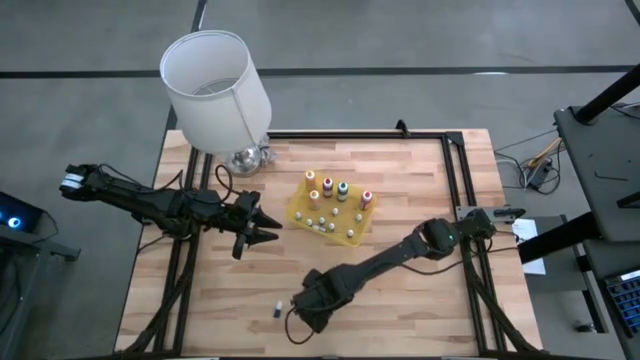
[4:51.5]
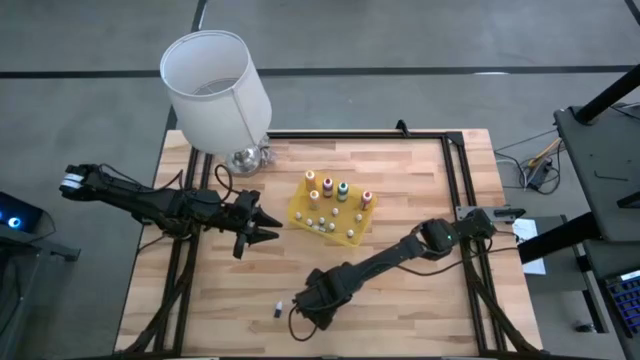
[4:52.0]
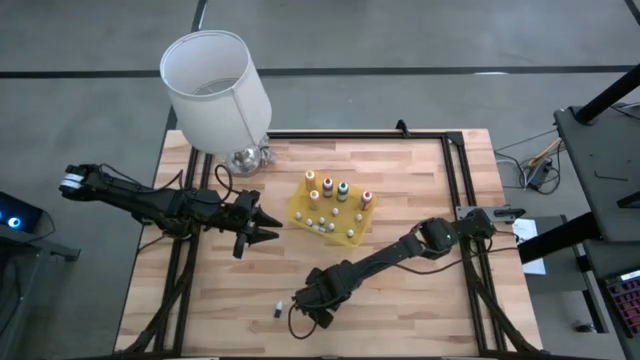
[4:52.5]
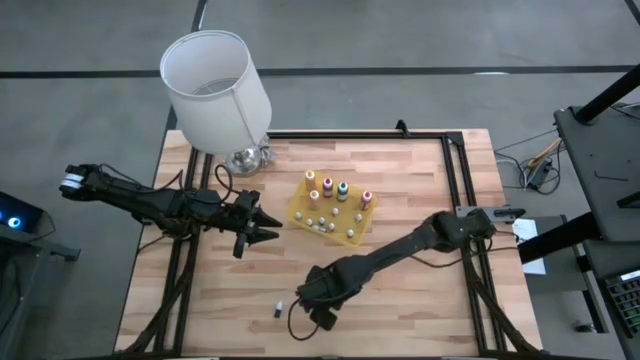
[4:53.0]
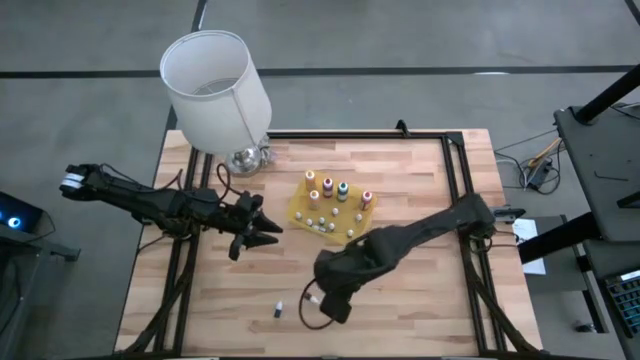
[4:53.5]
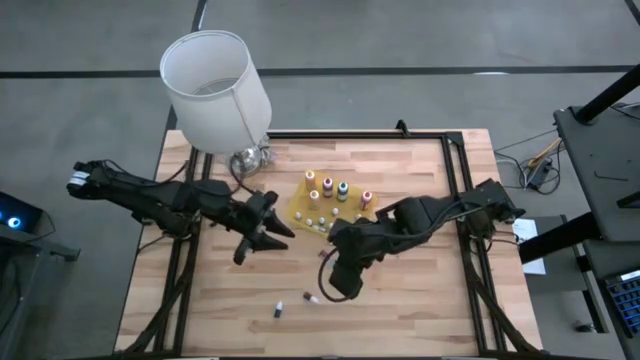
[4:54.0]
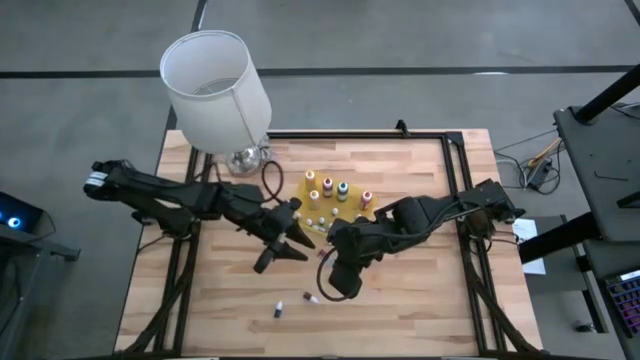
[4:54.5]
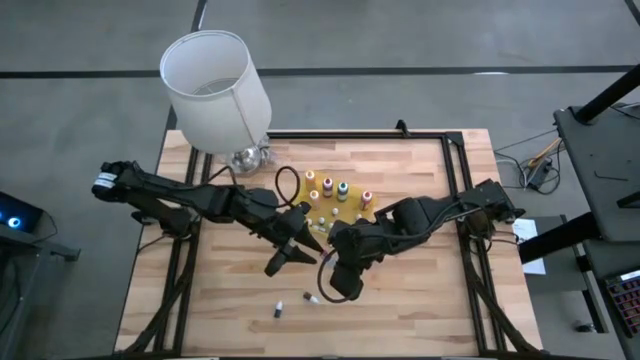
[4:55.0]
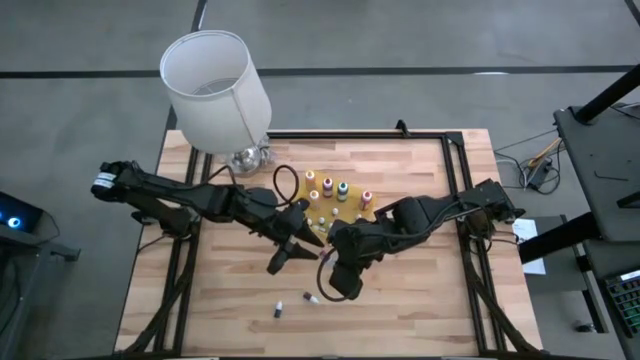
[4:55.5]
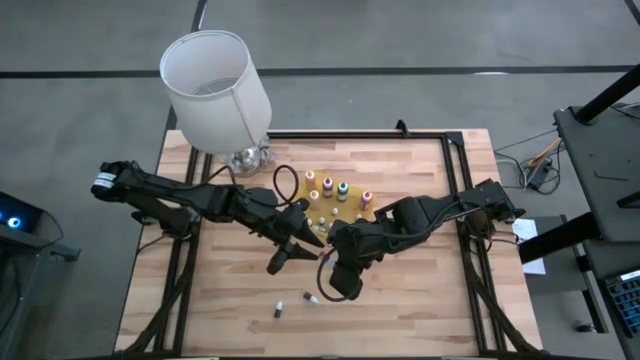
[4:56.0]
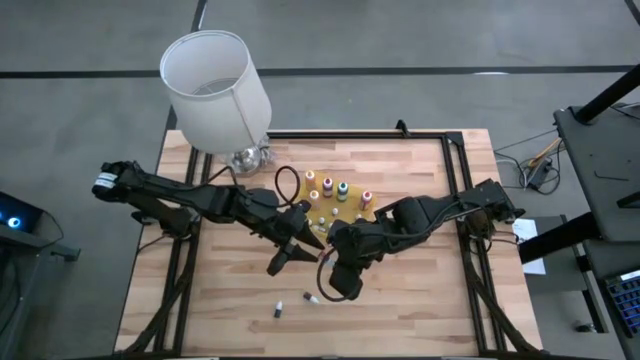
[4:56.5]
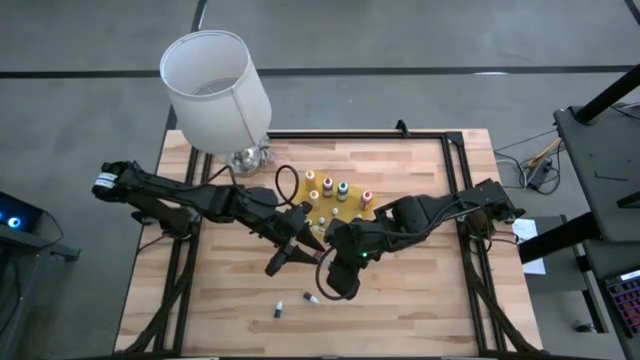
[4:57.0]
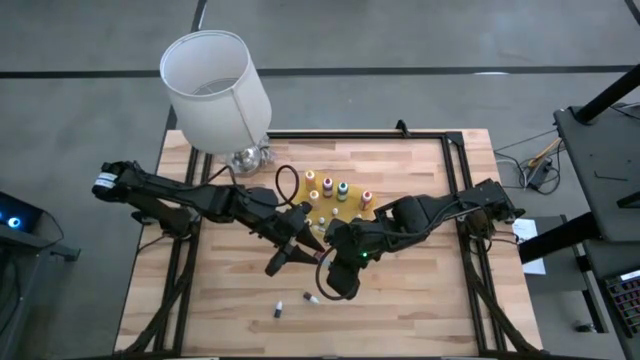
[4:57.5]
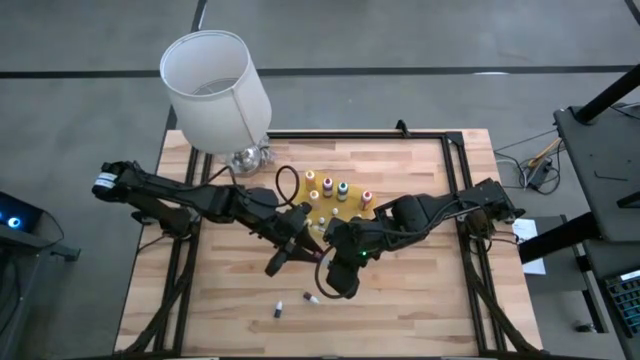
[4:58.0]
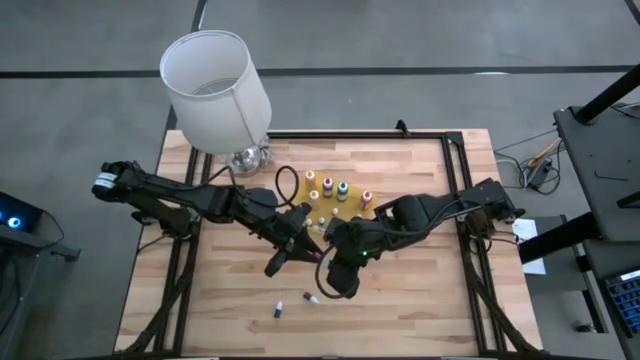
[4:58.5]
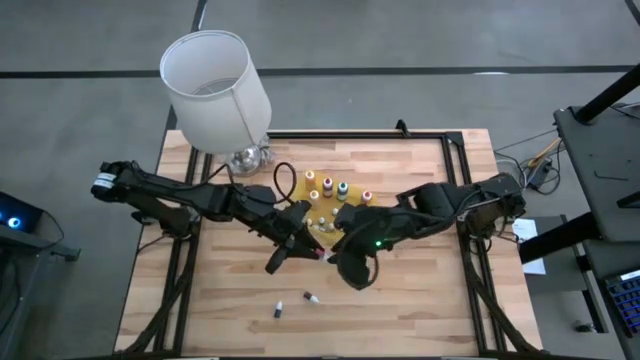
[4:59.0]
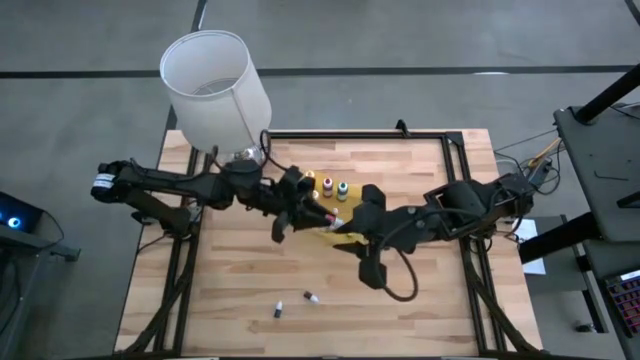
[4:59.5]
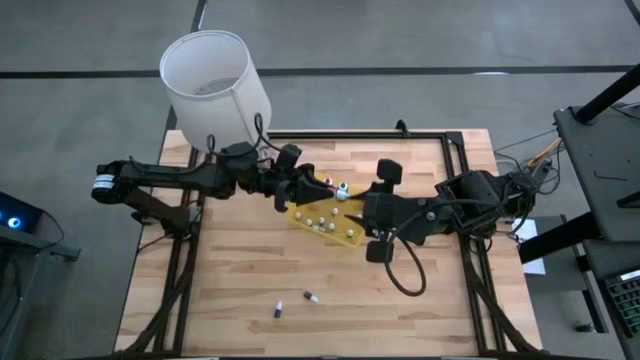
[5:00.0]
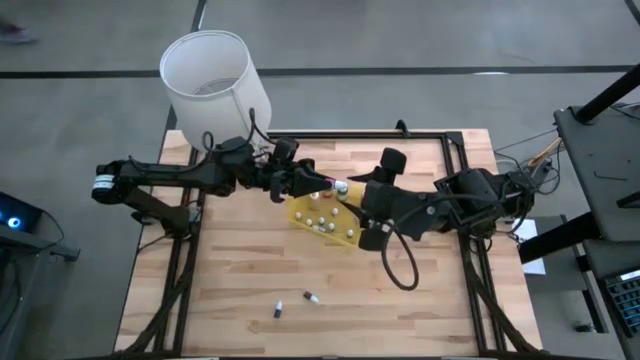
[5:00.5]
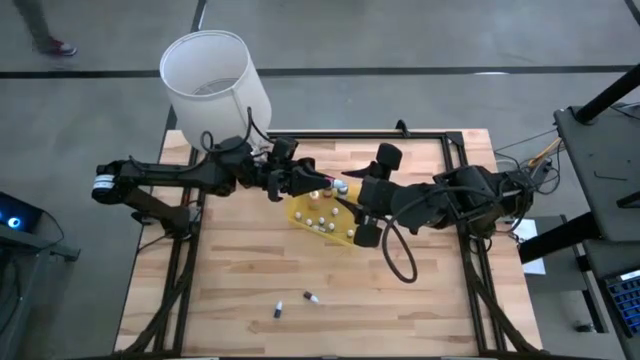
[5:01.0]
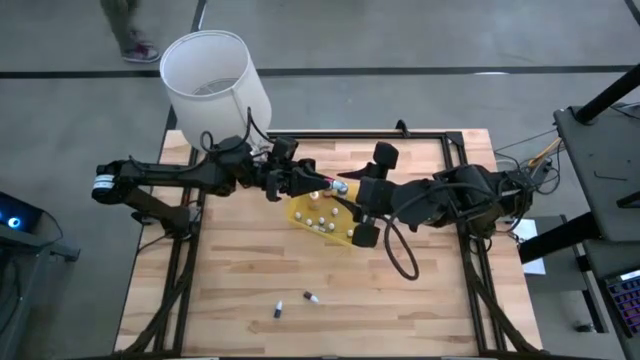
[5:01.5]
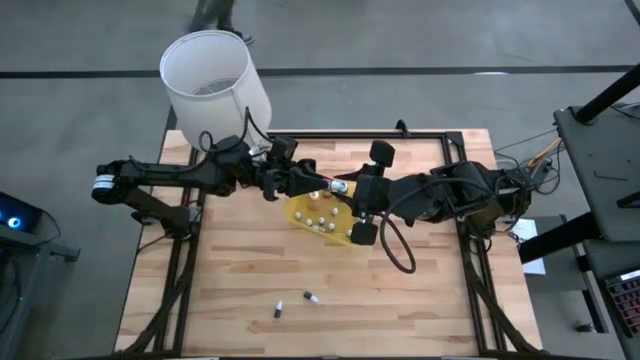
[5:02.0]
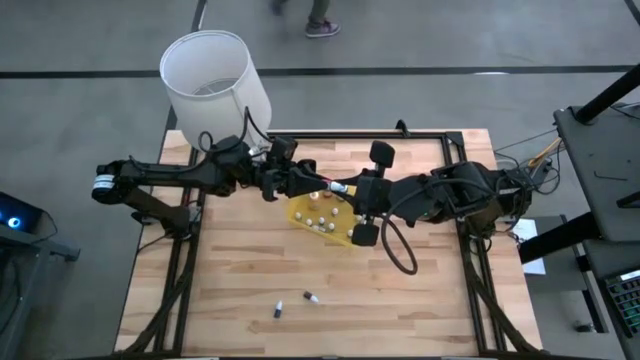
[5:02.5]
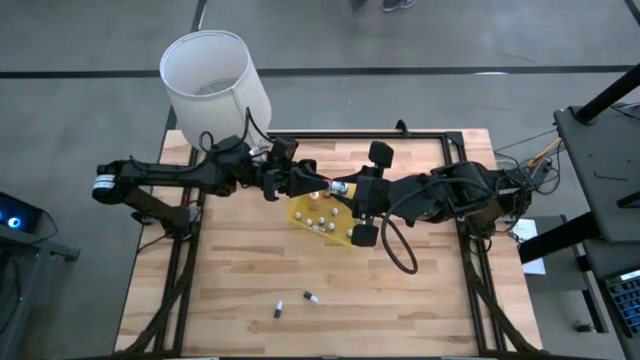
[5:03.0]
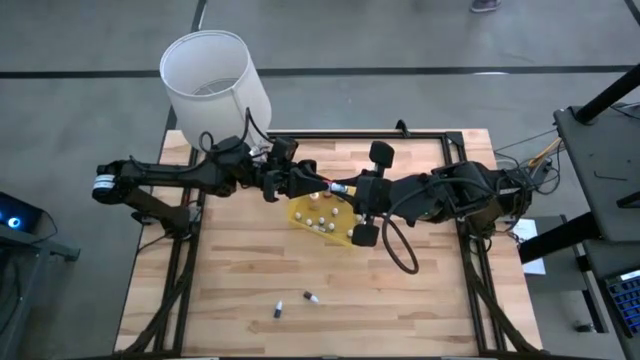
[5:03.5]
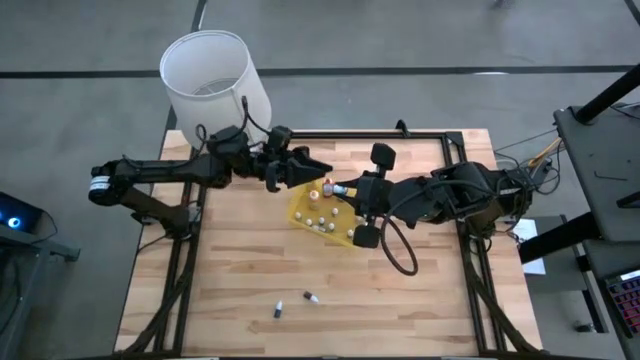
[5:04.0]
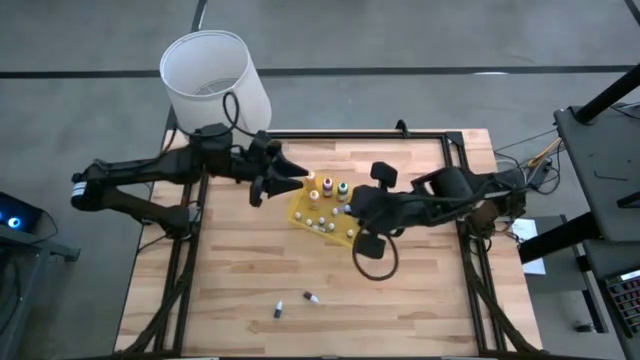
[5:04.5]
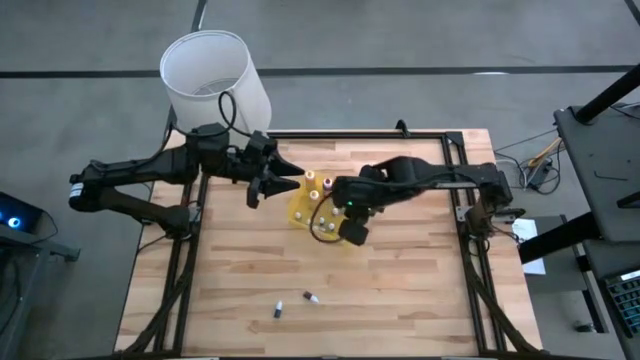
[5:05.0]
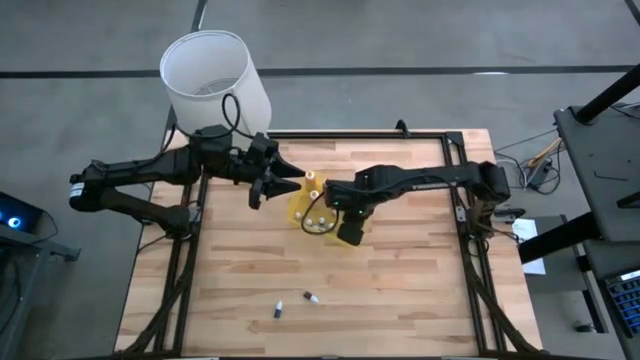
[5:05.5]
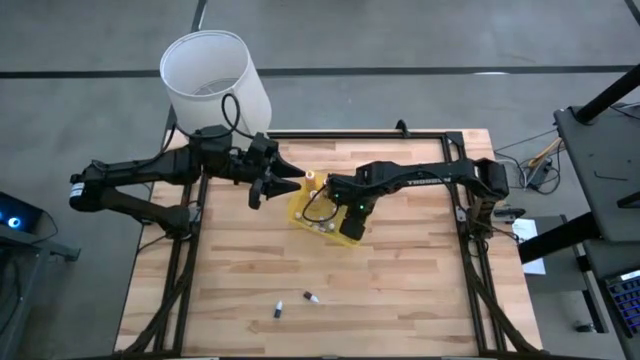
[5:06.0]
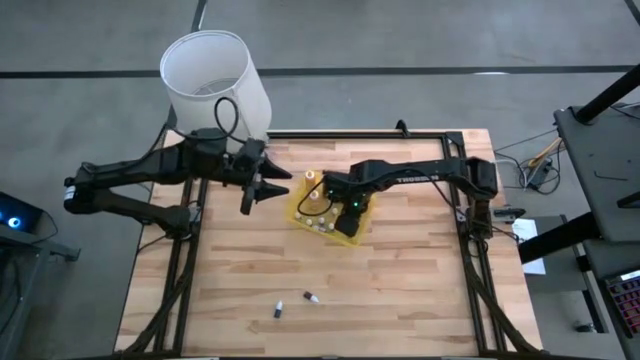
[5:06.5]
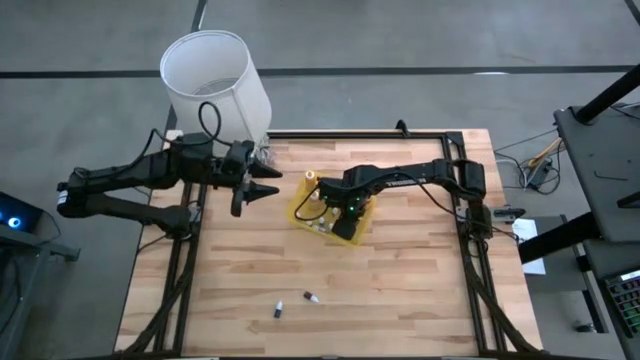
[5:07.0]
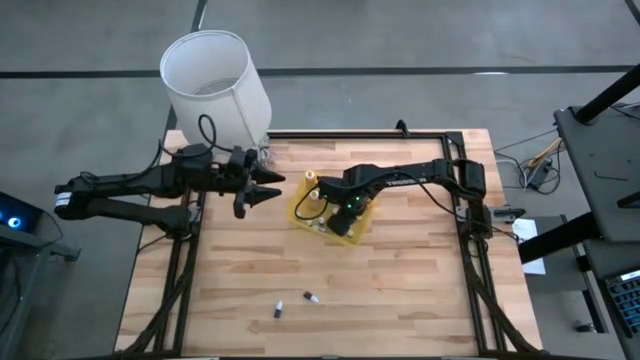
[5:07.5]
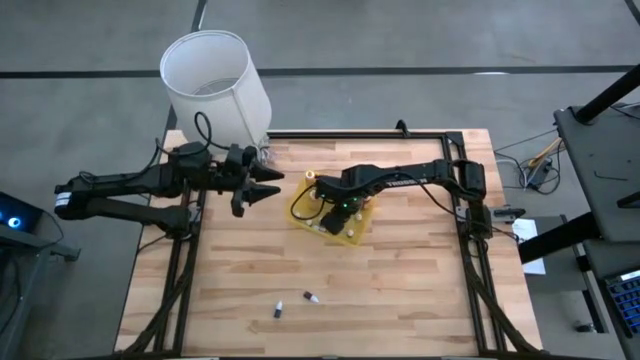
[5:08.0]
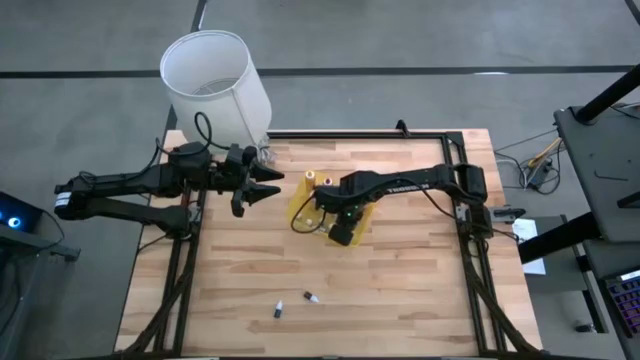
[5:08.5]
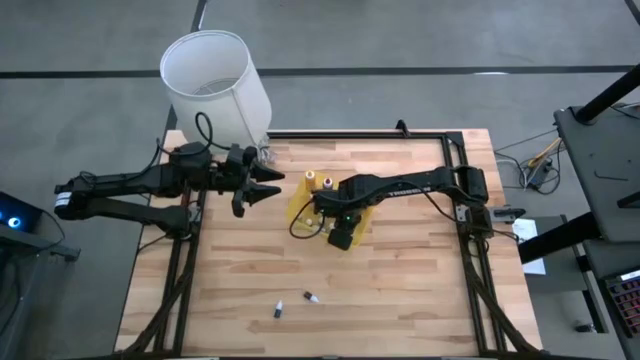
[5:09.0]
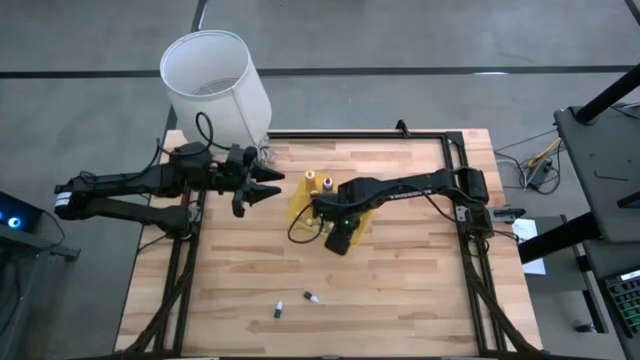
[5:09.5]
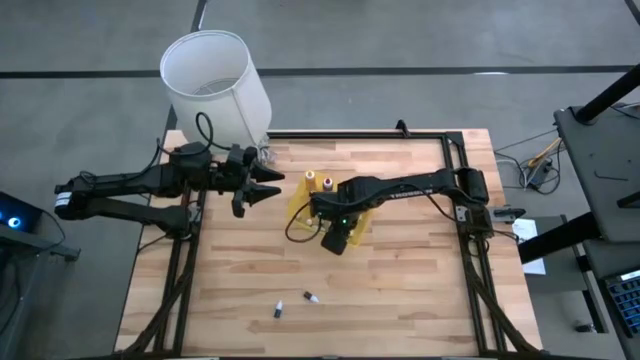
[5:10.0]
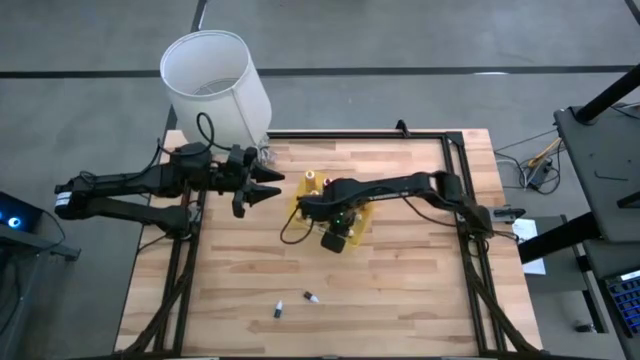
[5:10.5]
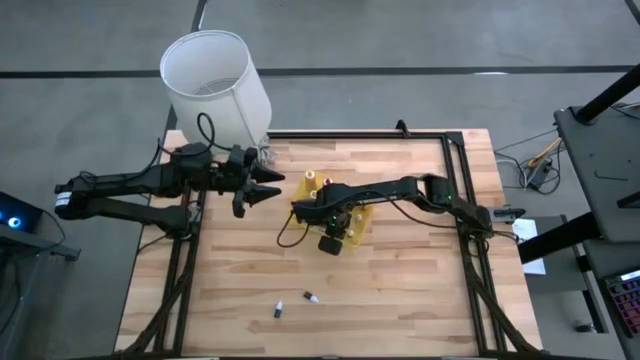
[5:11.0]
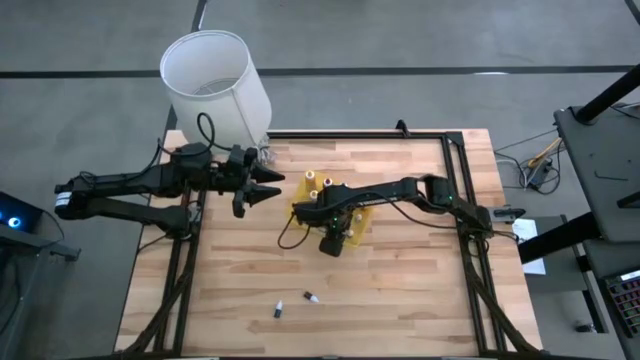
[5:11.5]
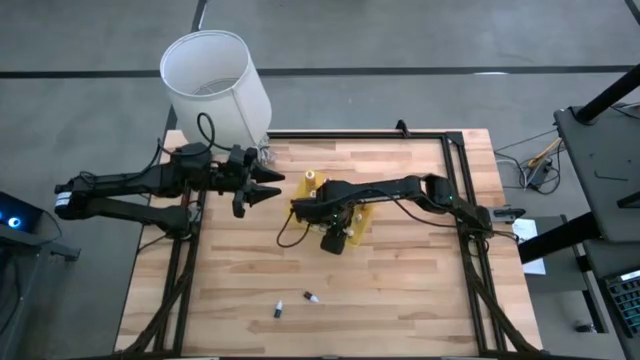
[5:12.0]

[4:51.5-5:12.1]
Task: Pick & Place food coloring
Put the small red food coloring bottle into the yellow bin

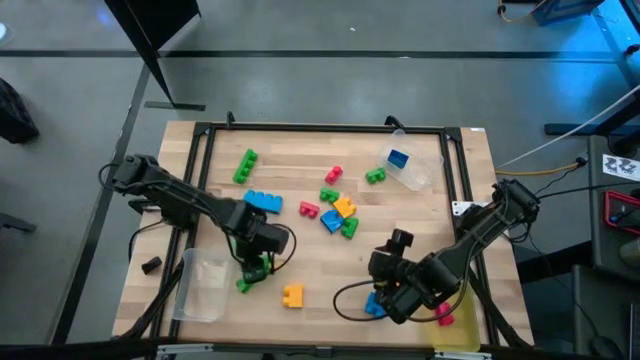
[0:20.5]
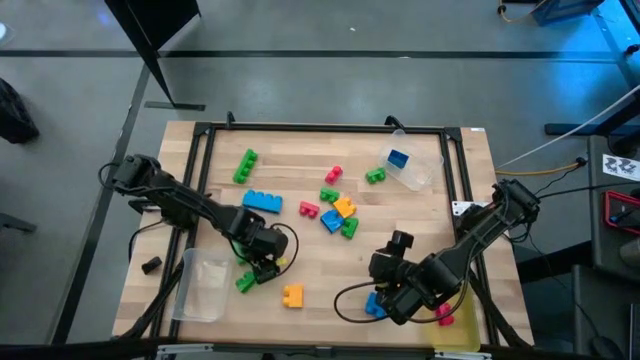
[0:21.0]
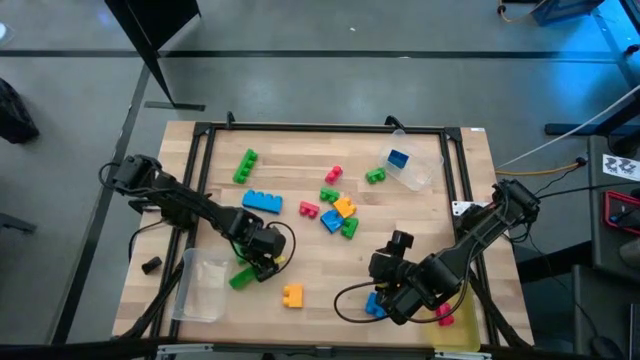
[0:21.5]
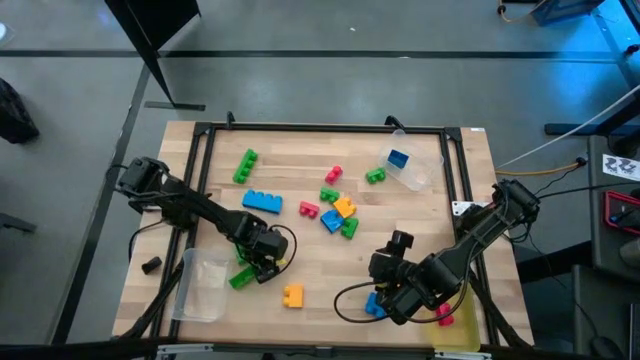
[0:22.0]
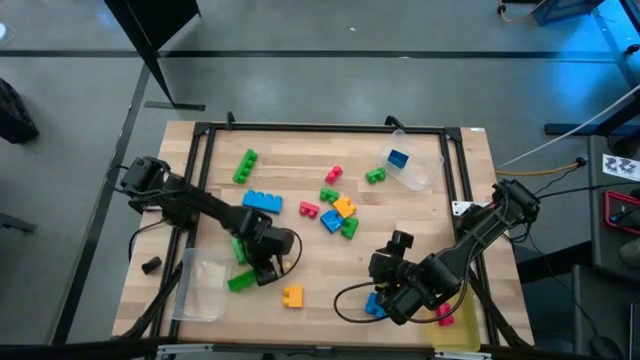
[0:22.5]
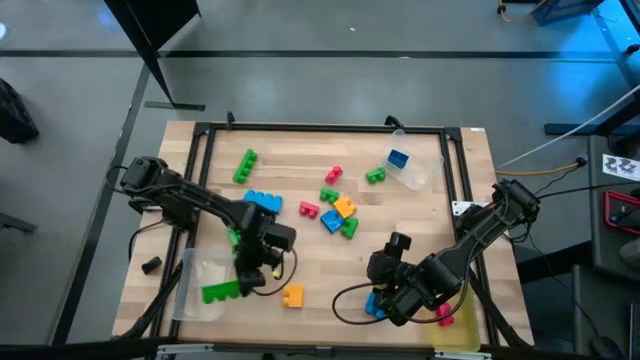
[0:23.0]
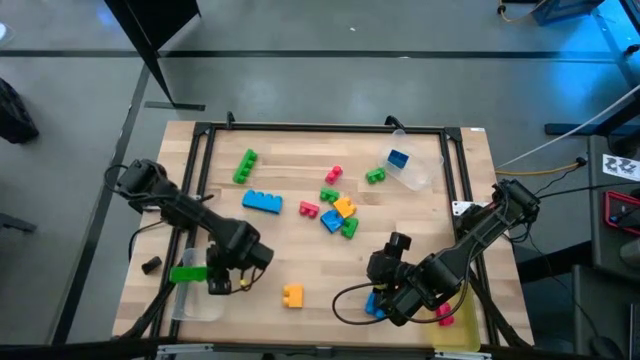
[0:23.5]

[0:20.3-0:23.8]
Task: Sort blocks by size
Put the bottom 4 stud green game piece into the bottom transparent bin
